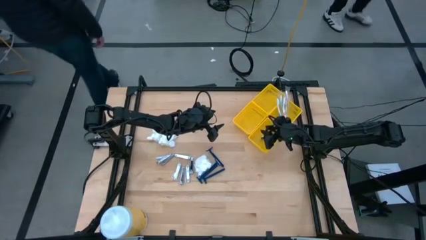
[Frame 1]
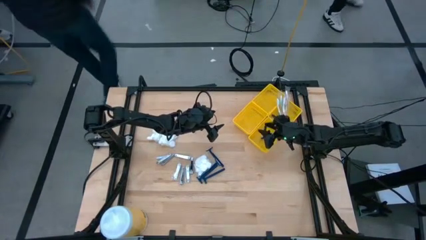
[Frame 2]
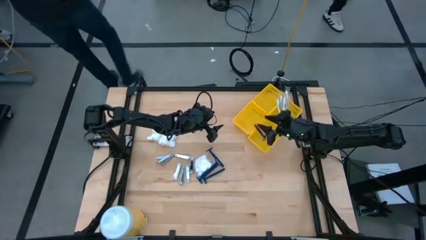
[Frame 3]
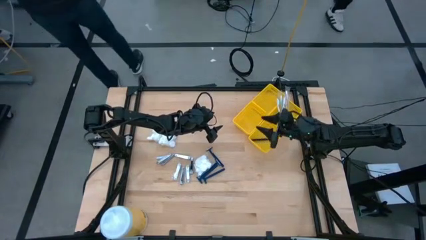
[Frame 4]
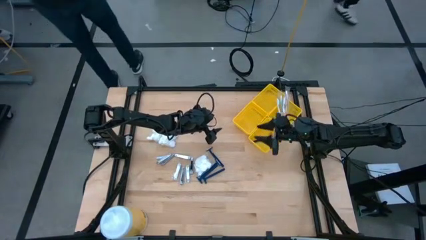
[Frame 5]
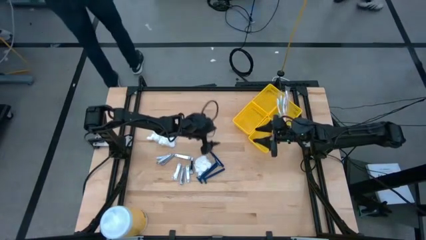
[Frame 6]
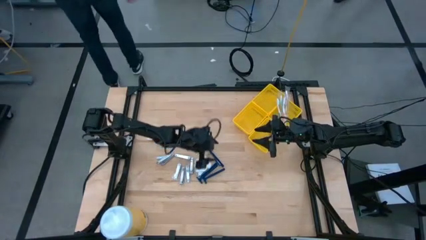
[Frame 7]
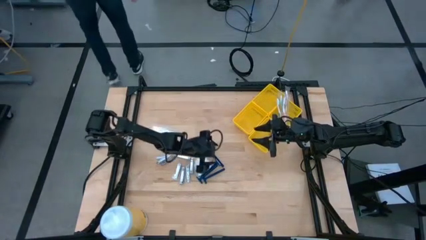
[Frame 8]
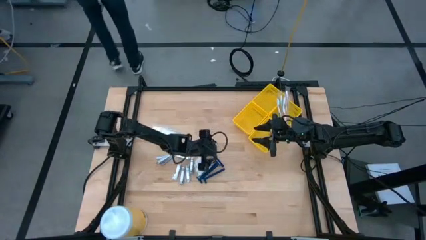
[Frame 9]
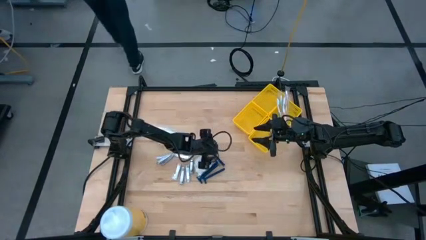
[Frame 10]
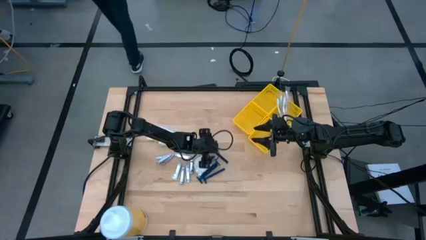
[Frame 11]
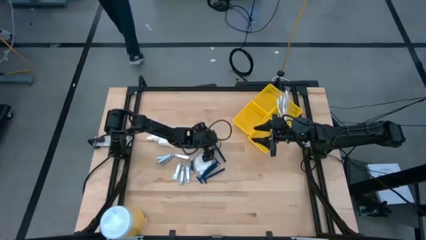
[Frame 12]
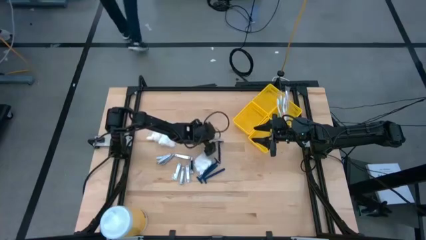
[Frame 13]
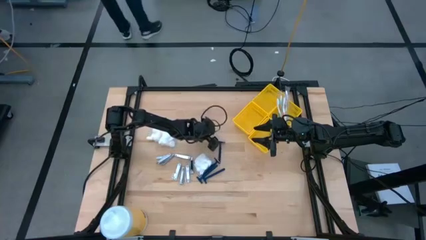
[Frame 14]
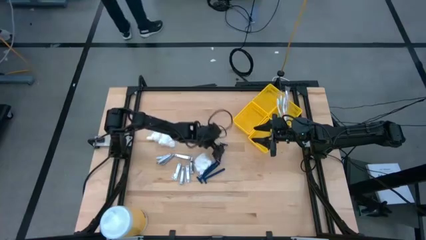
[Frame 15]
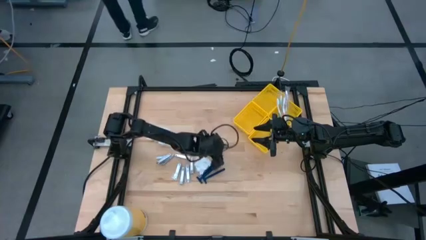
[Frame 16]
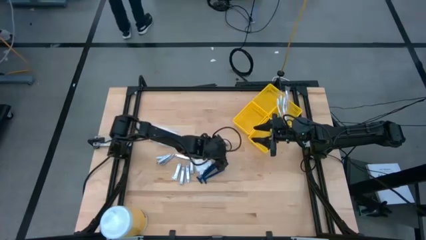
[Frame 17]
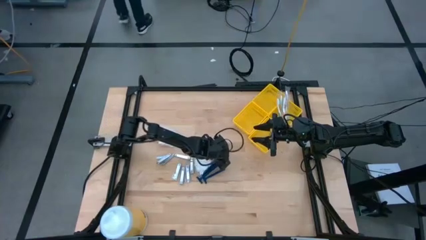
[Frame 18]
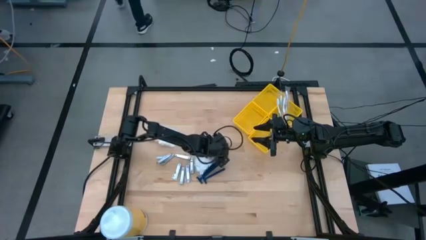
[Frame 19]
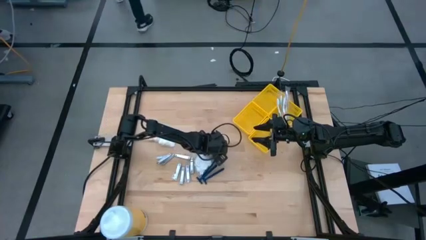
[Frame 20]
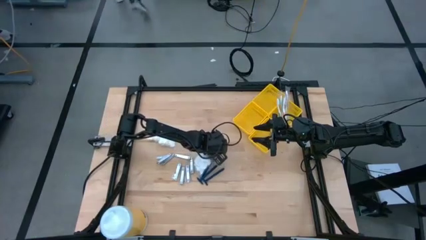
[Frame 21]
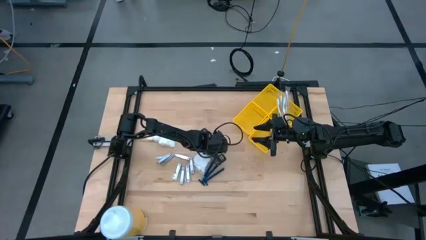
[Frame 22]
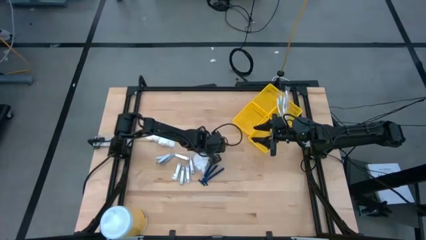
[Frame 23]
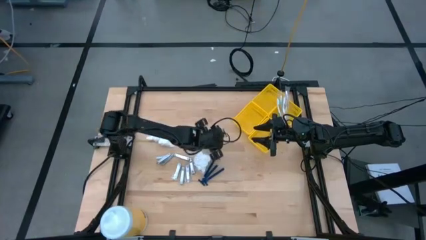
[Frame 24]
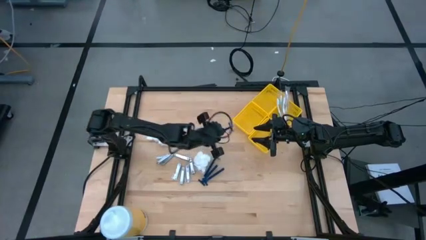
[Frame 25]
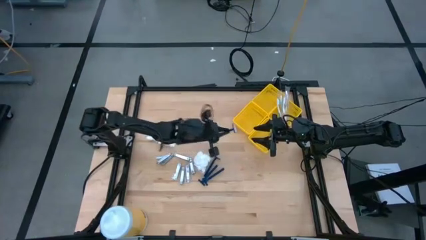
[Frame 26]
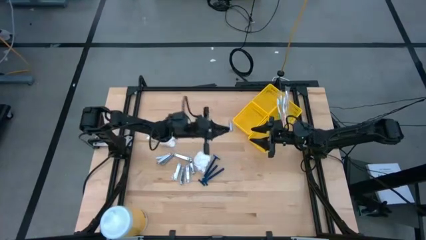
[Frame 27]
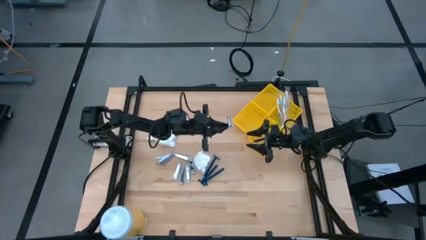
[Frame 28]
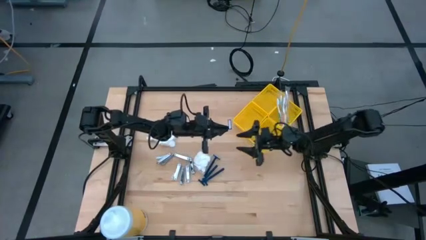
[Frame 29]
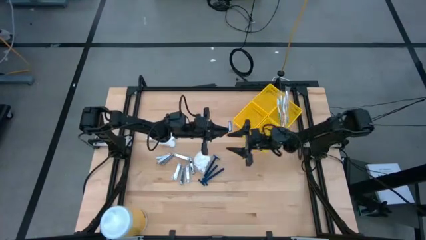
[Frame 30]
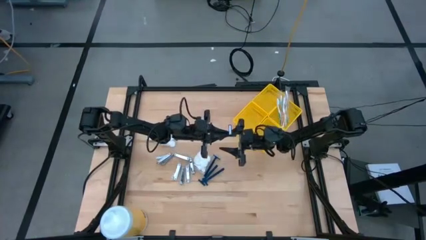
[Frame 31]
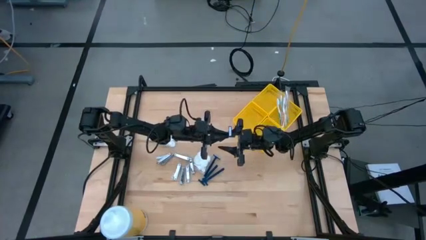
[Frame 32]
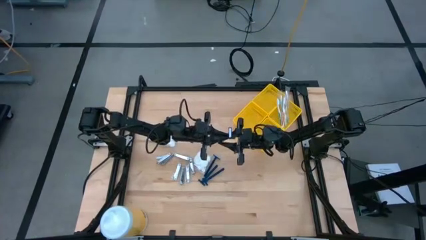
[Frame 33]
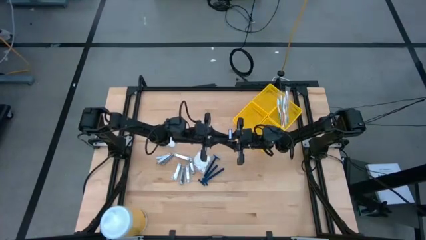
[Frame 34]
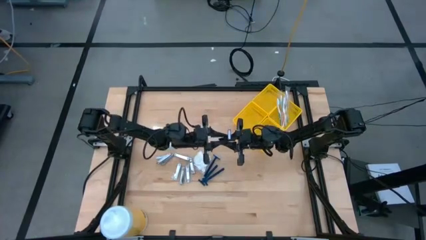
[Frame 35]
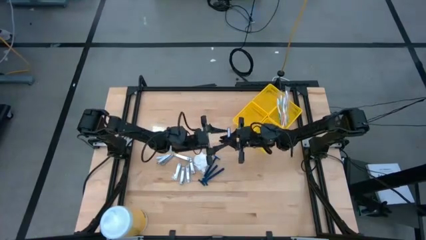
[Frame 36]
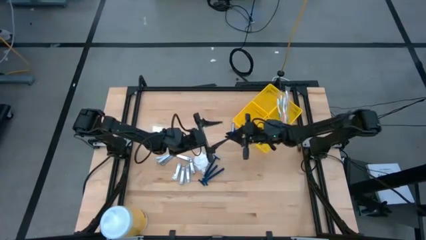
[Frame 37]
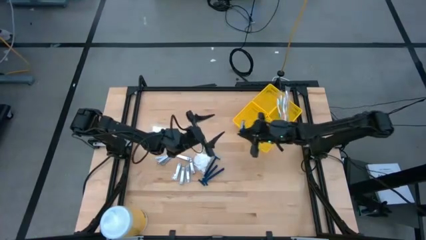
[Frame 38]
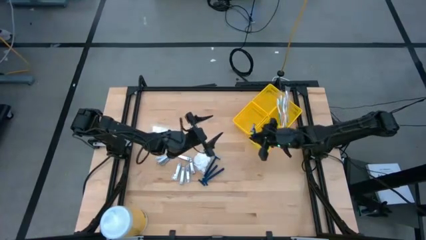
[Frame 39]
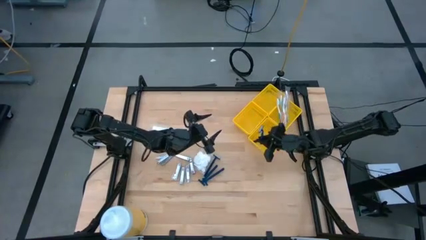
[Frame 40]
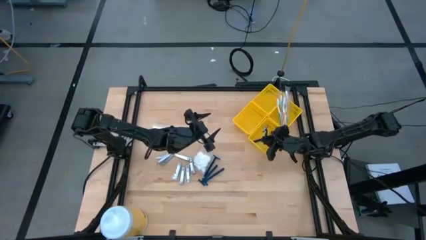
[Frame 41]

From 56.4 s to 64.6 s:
Task: Pick & Place Travel size toiletries
Put the blue razor into the bottom right yellow bin

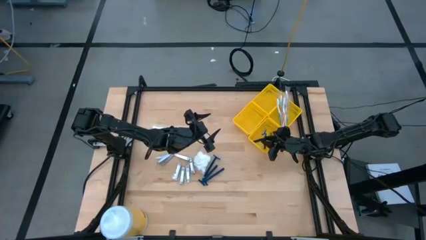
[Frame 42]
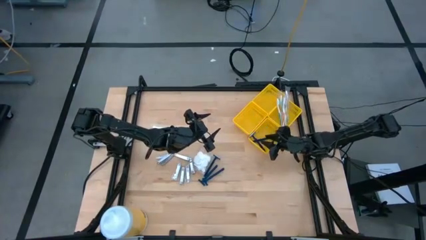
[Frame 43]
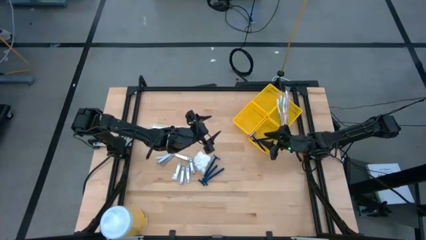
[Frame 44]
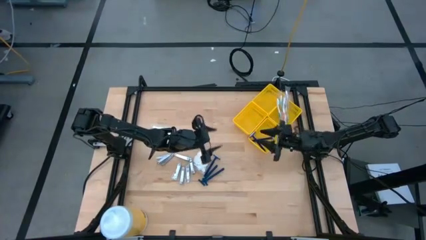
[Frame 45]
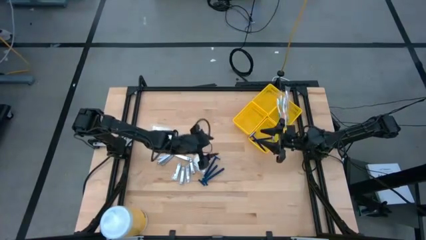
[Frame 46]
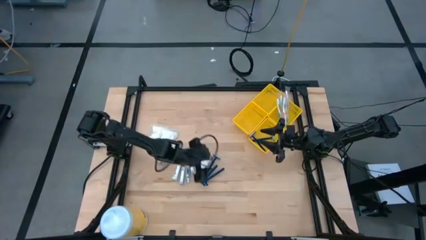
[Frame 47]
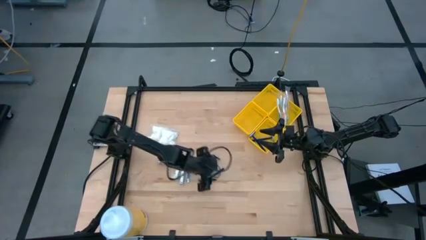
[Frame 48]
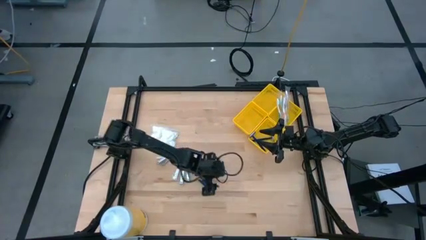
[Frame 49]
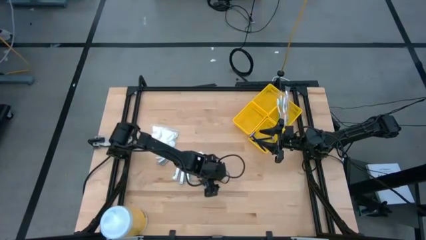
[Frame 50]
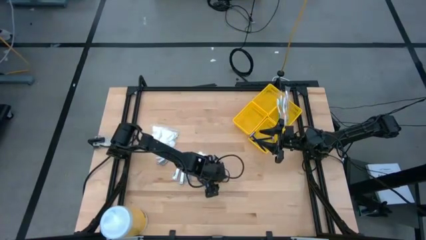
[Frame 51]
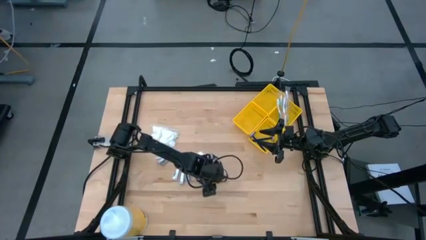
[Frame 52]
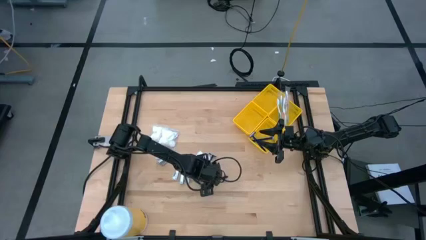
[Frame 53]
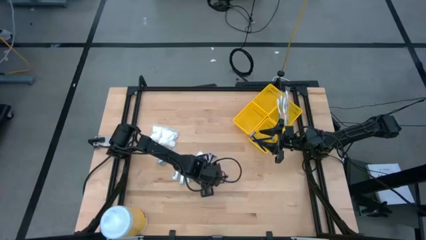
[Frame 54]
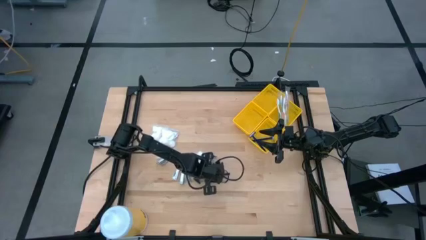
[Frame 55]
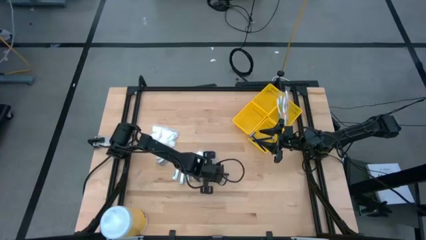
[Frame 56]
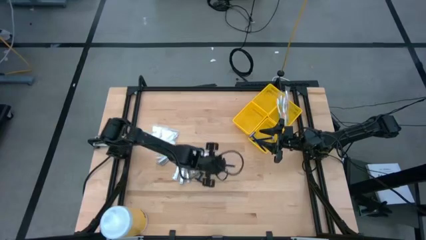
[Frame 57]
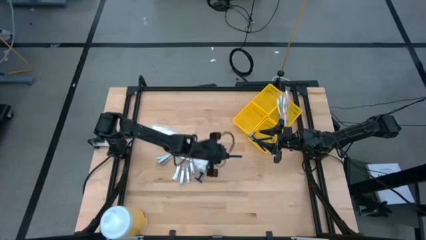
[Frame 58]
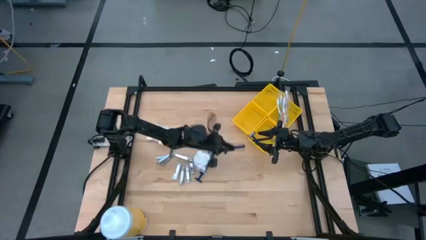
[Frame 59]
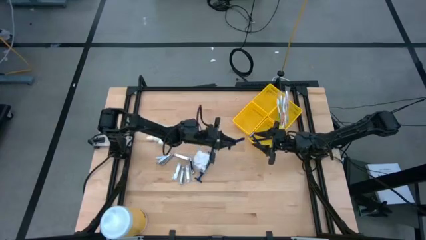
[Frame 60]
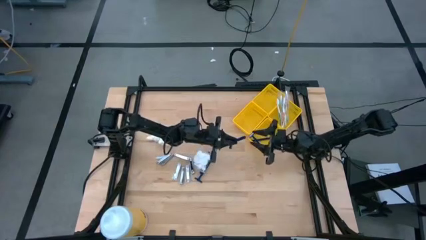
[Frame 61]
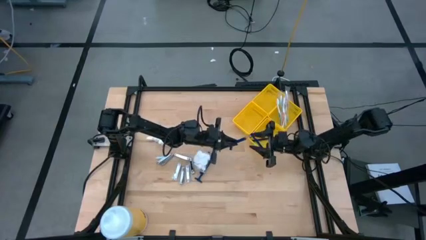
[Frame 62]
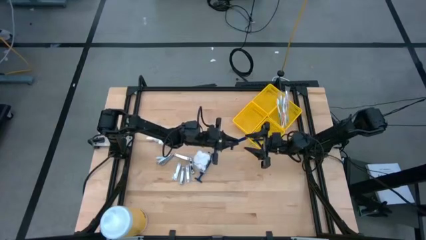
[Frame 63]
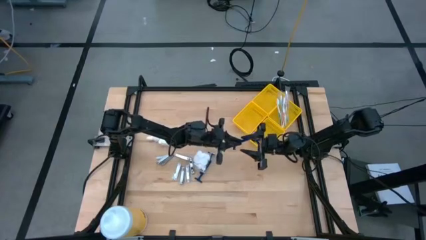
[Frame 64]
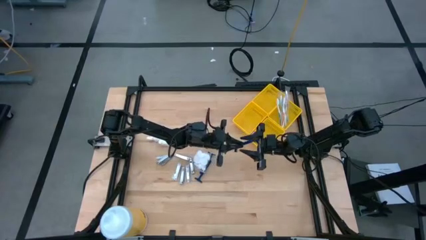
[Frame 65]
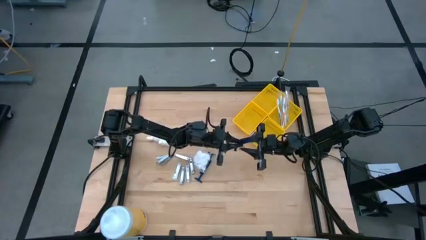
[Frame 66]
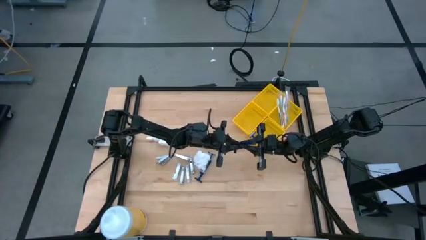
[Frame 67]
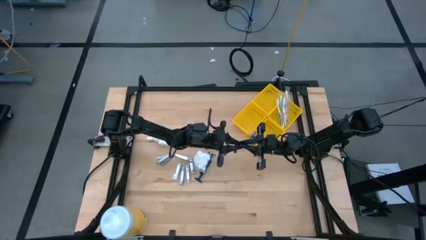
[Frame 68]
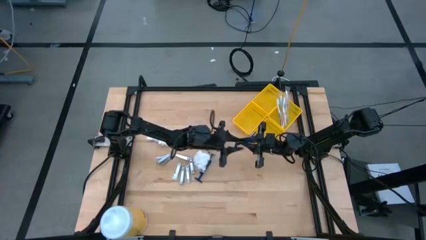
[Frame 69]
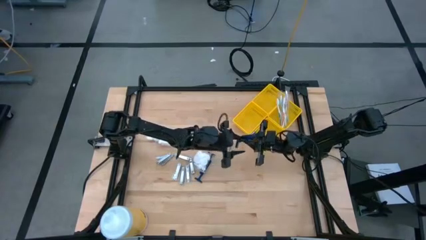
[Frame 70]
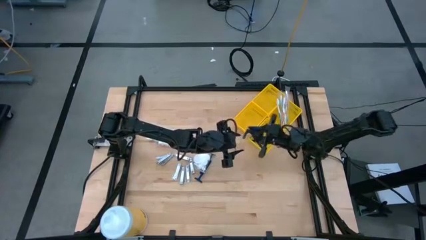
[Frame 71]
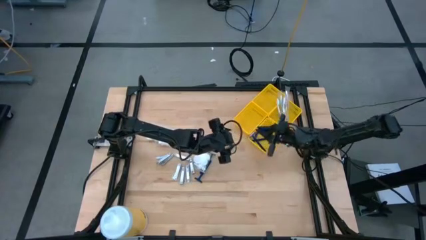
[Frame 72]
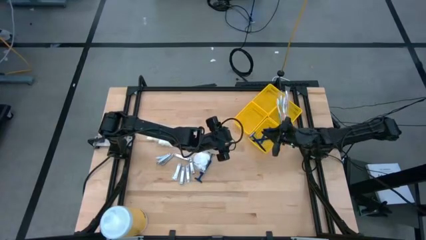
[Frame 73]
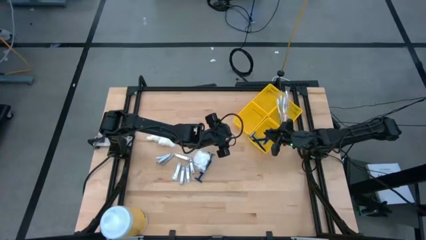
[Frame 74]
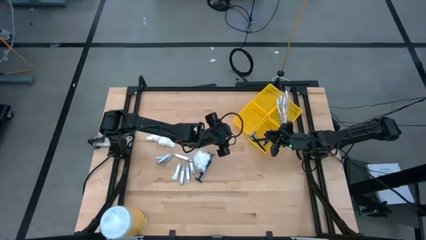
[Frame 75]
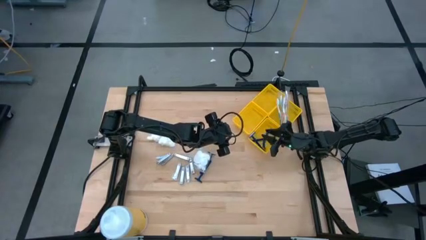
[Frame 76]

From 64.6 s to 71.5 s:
Put the blue razor into the bottom right yellow bin
